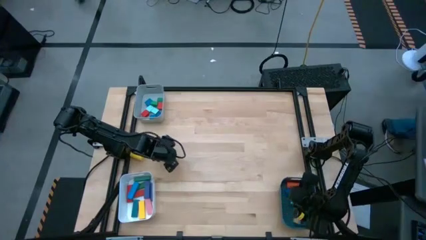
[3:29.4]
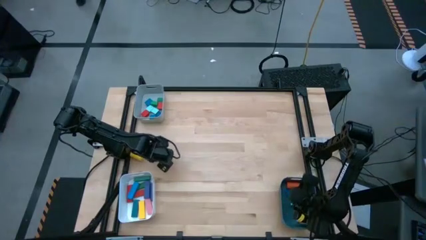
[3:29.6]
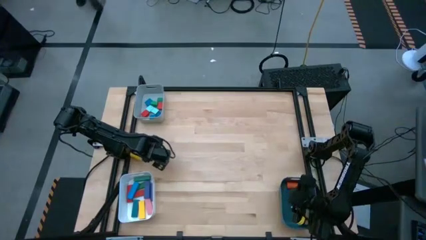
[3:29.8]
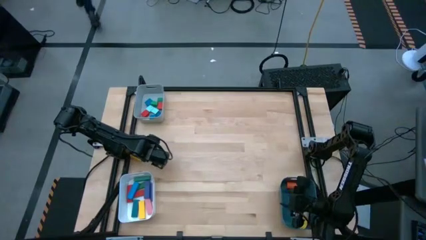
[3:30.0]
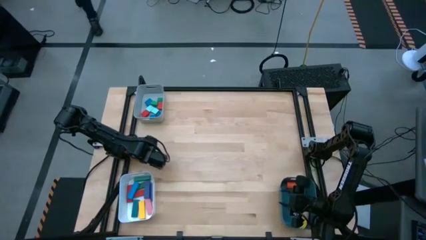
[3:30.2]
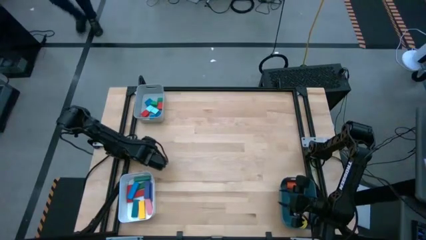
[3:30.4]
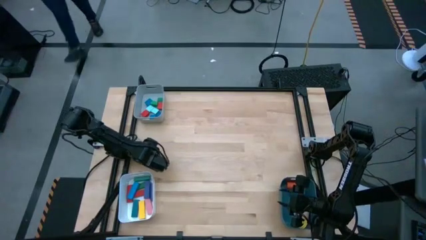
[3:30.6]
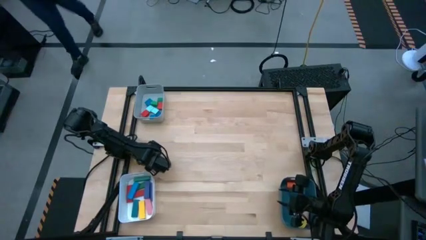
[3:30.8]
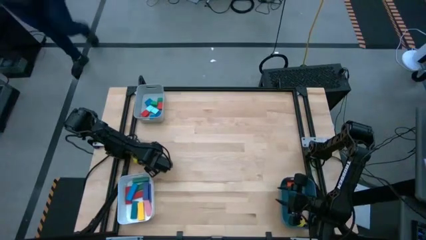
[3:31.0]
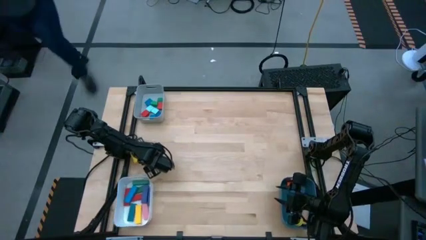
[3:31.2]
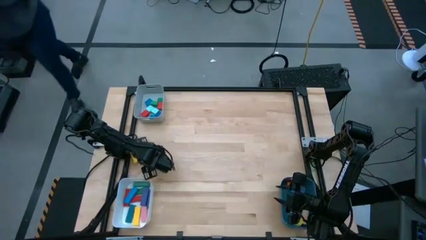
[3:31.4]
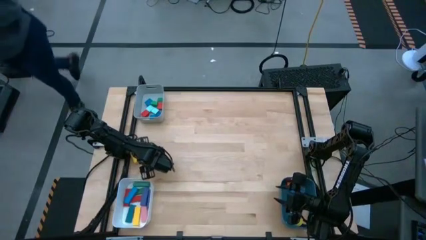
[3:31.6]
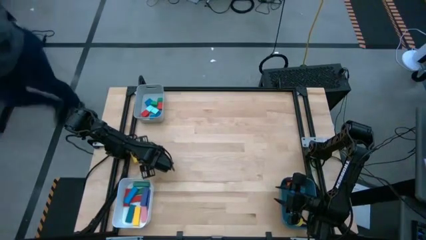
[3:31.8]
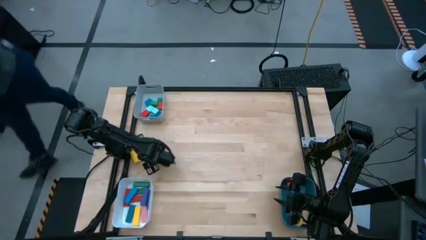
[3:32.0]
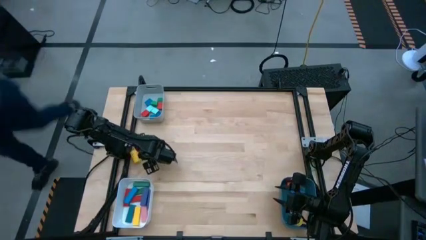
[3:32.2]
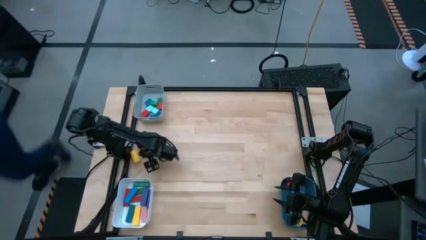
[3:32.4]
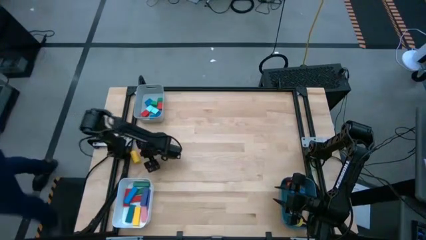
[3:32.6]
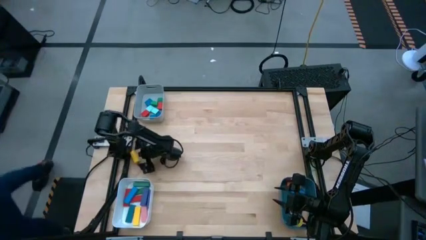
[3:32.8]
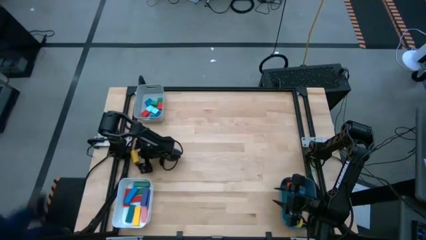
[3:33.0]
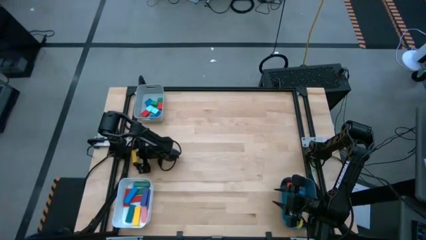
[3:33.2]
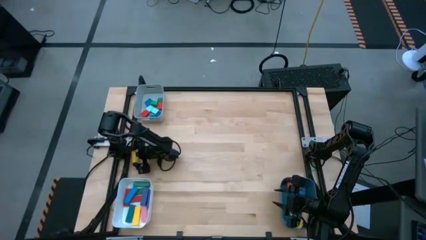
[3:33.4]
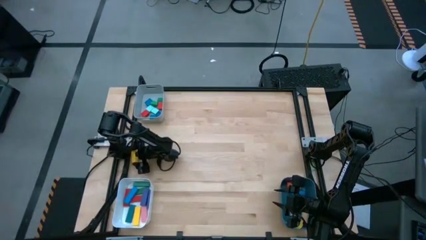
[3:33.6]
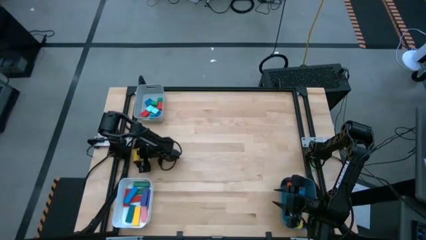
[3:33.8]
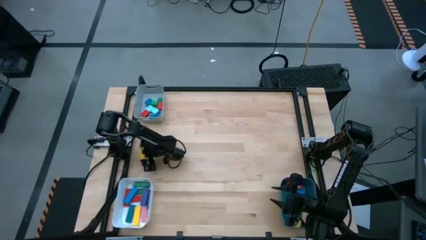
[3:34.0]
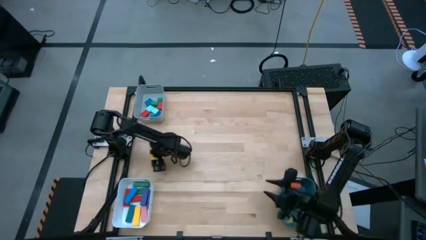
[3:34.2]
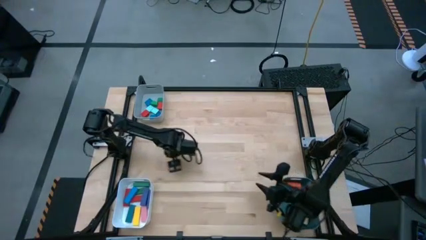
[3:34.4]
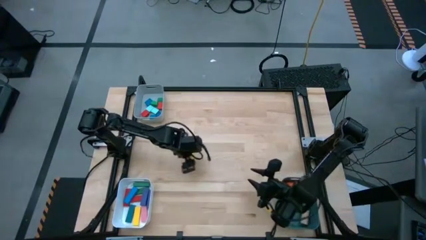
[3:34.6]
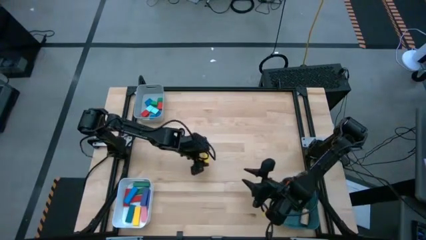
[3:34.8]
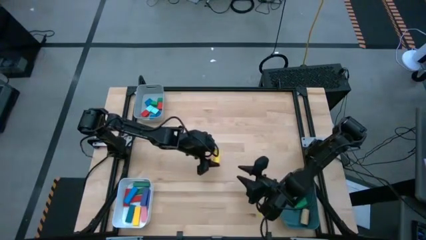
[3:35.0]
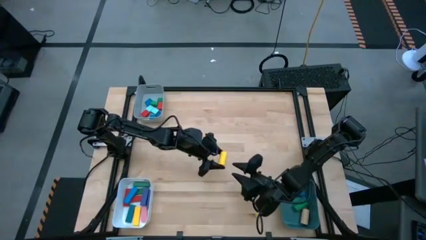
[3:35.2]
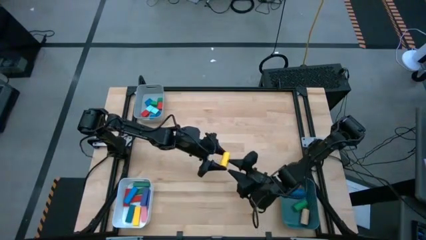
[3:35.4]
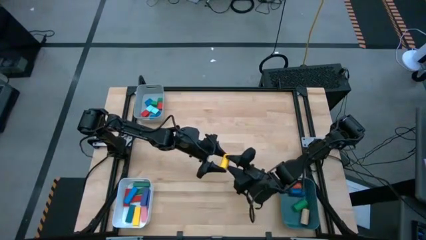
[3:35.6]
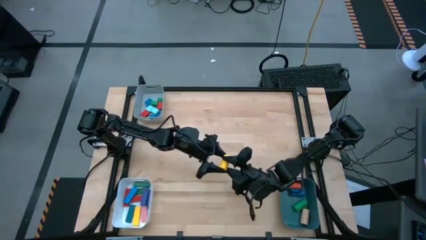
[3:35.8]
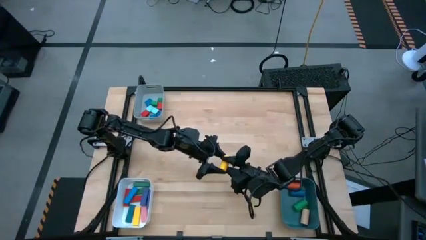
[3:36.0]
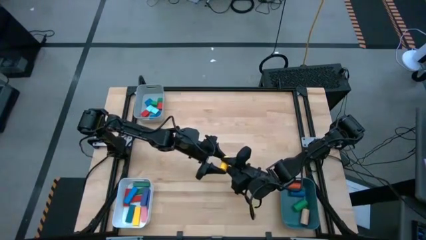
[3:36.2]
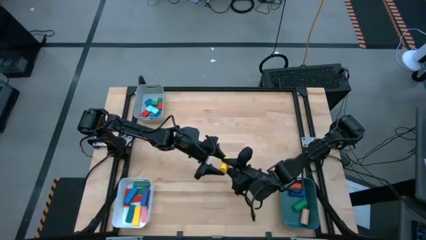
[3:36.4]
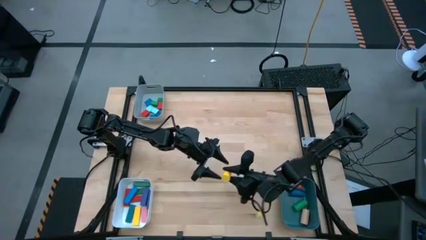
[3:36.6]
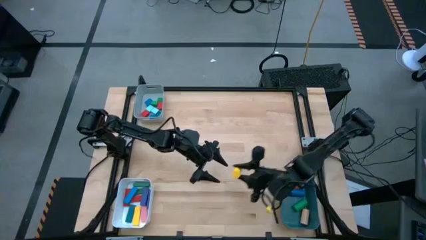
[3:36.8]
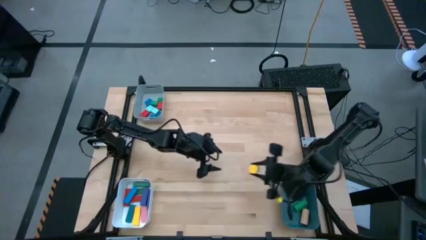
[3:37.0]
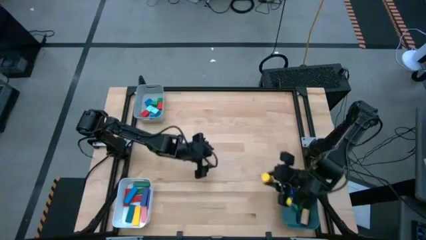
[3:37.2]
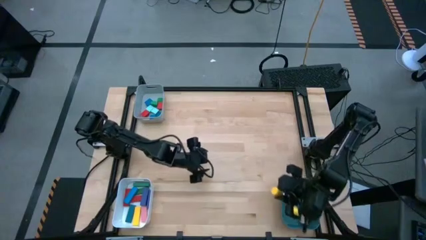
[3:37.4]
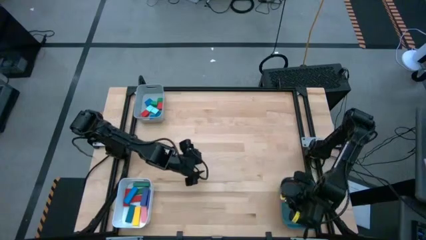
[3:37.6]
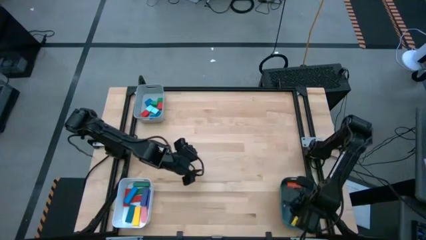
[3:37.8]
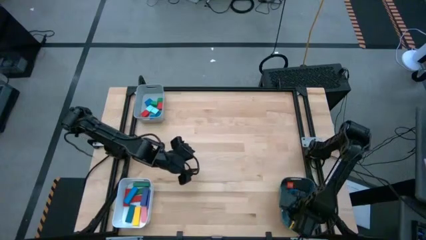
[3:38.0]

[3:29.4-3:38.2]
Task: Sort blocks by size
Put the yellow cylindrical block into the blue bin

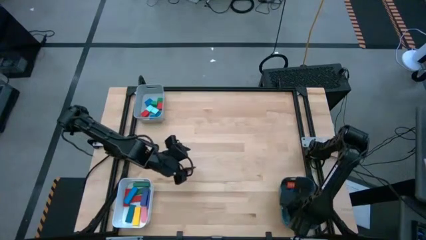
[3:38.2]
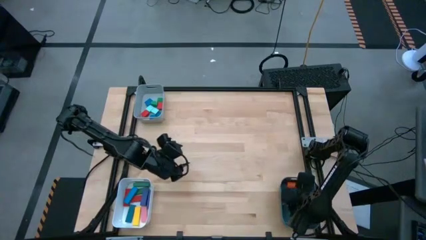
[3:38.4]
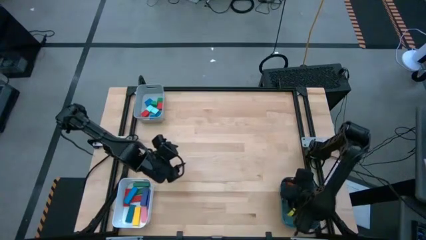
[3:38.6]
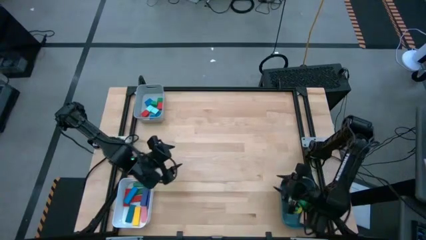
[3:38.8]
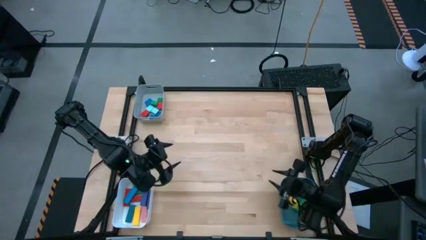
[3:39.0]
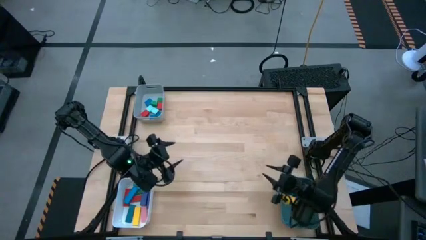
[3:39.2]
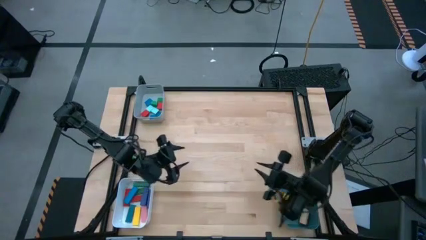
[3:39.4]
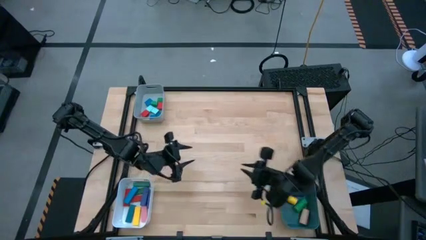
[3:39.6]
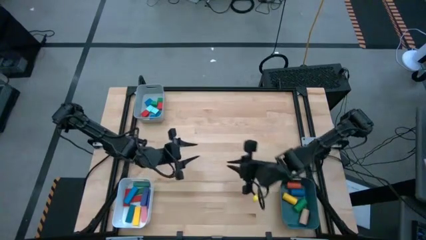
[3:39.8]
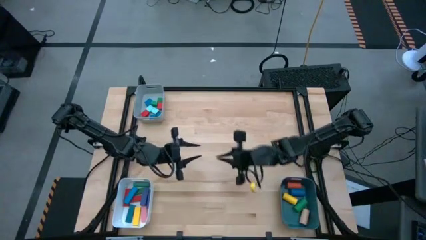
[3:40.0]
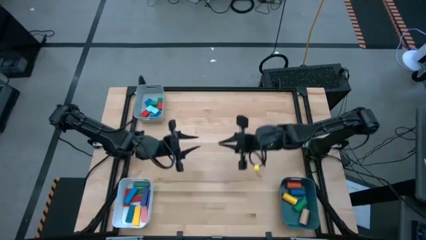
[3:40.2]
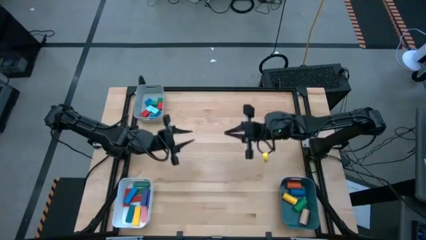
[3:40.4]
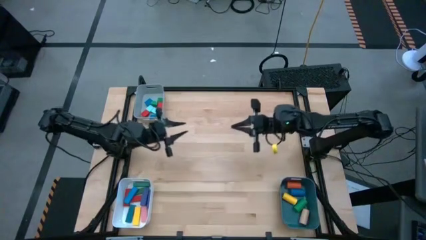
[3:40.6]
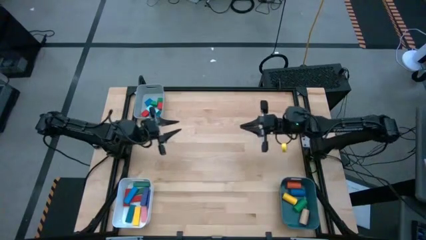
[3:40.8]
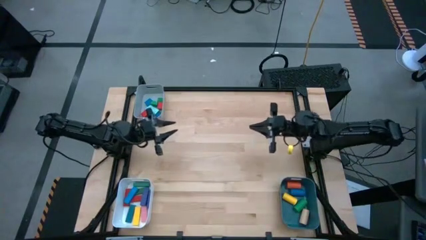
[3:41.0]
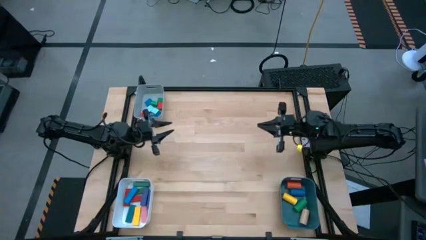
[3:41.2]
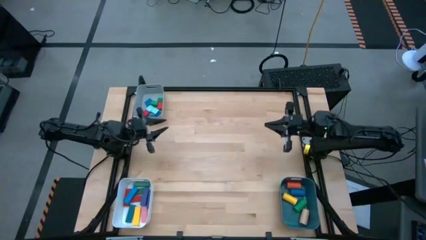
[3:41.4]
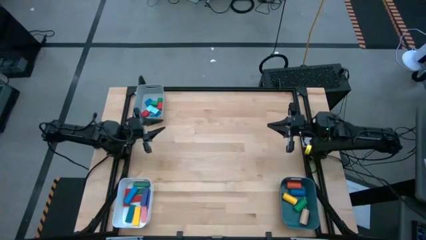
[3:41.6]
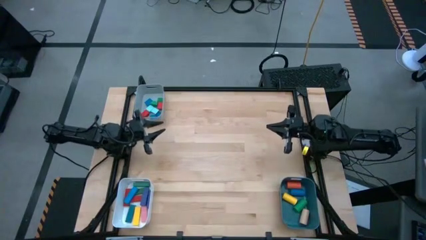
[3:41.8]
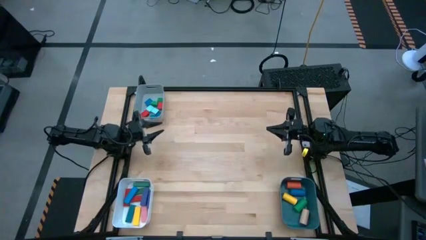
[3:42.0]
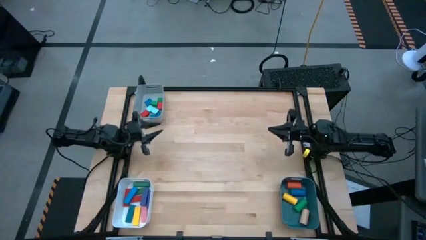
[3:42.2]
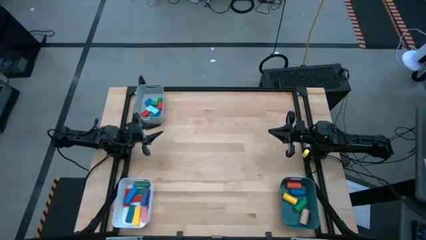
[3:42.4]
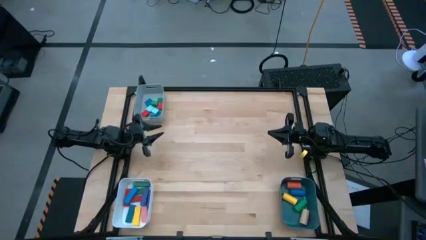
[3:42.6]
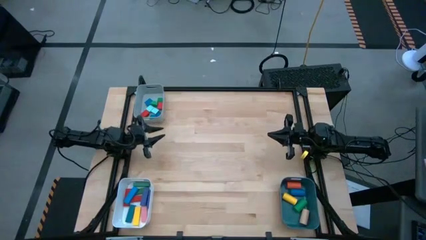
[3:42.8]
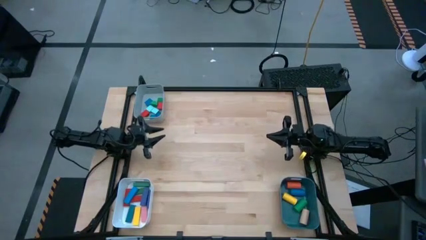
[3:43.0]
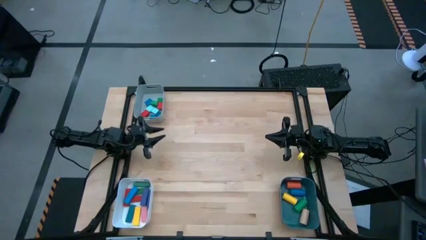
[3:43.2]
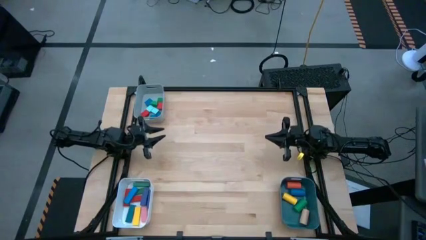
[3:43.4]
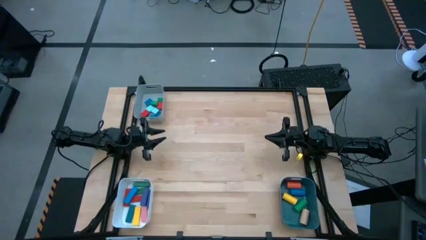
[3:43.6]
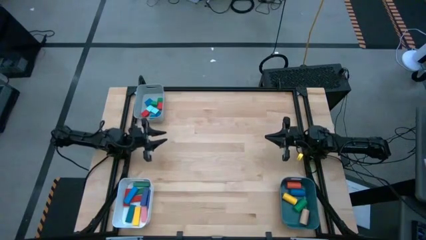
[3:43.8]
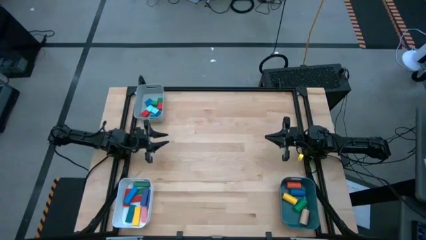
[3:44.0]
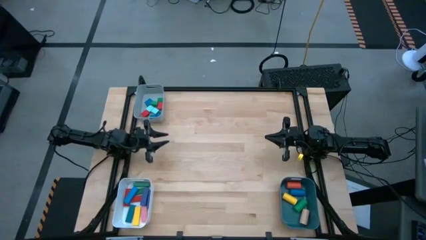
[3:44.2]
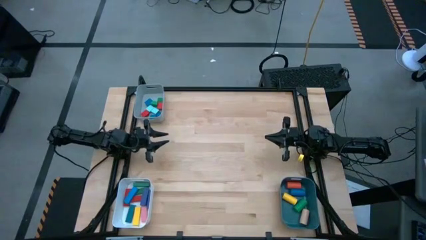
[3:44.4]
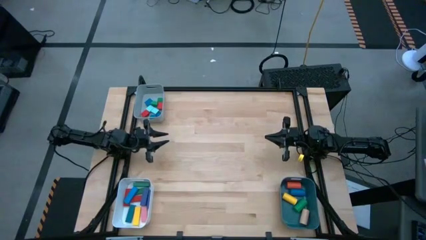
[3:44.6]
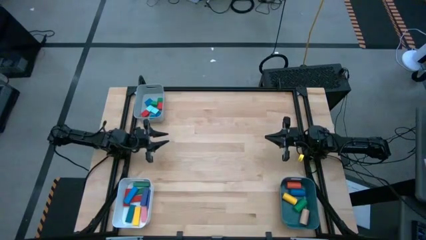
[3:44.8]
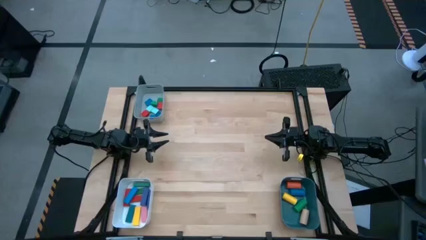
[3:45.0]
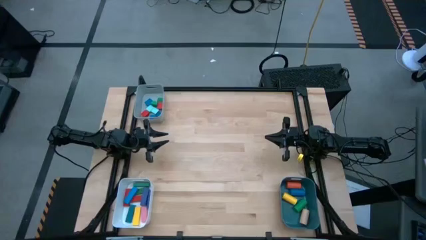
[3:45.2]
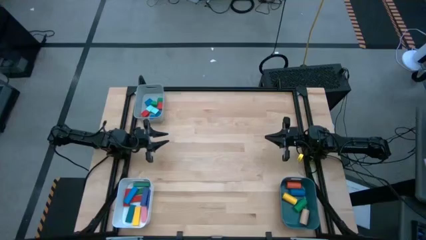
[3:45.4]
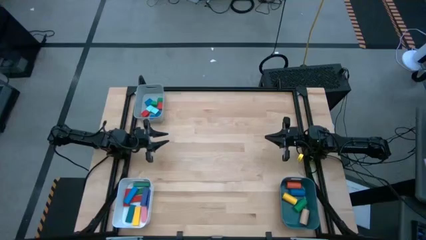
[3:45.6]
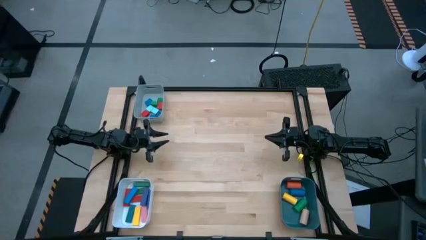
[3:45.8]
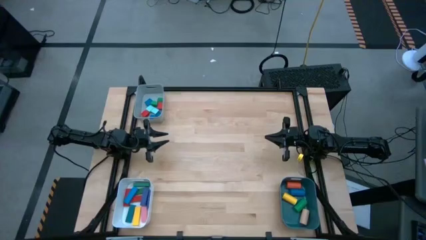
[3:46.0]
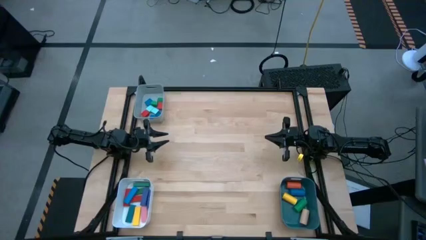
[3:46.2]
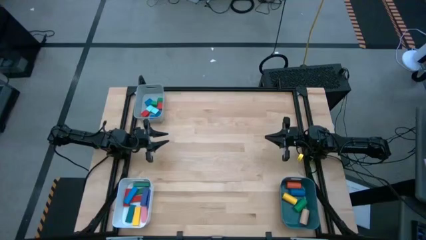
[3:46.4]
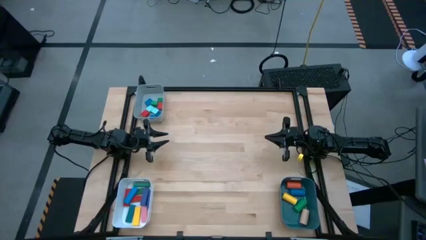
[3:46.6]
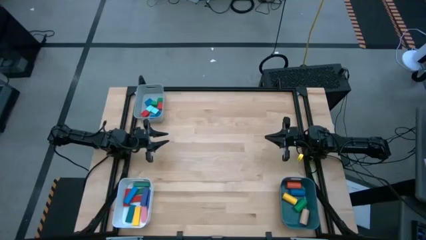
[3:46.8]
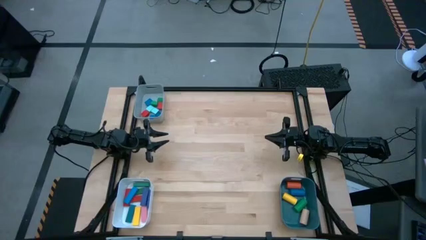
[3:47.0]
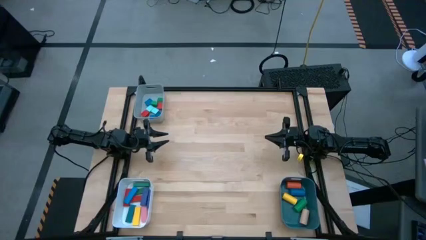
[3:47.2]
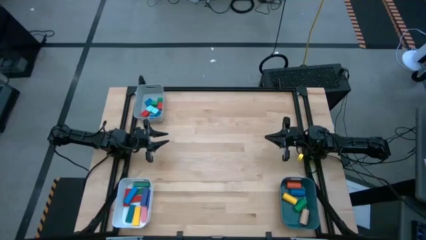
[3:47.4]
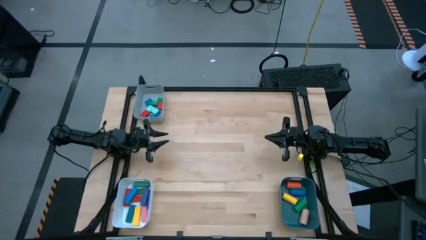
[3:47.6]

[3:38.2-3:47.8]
Return to Home Position
